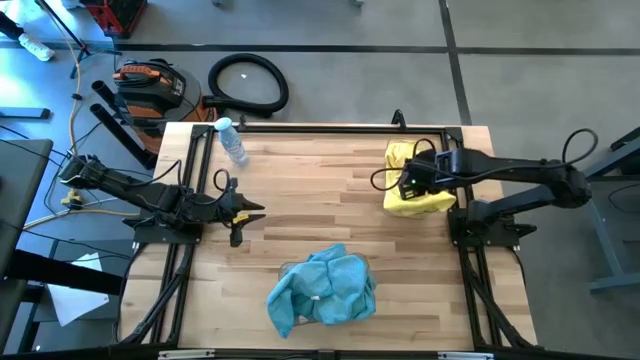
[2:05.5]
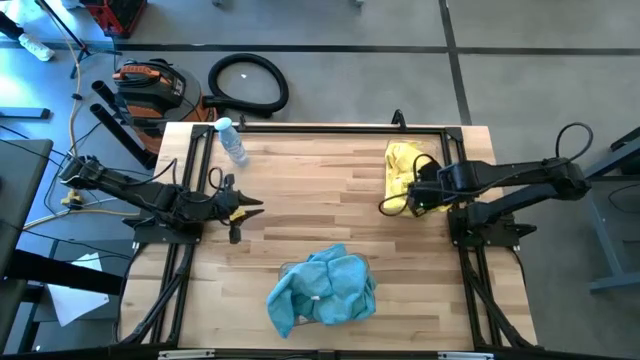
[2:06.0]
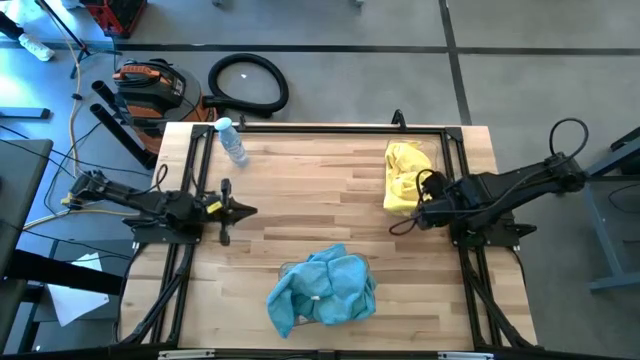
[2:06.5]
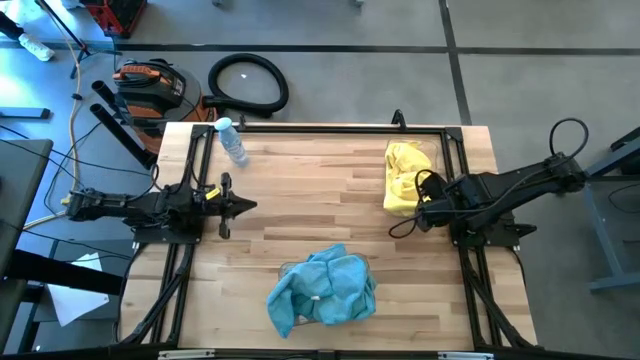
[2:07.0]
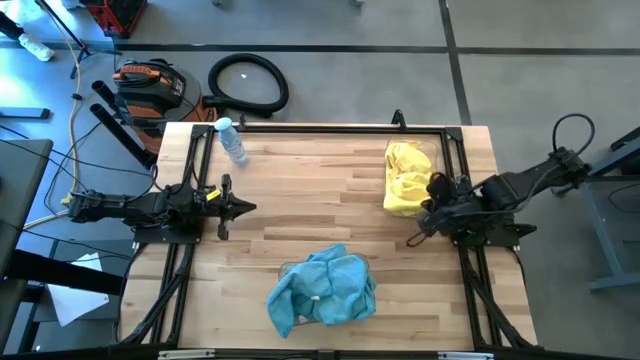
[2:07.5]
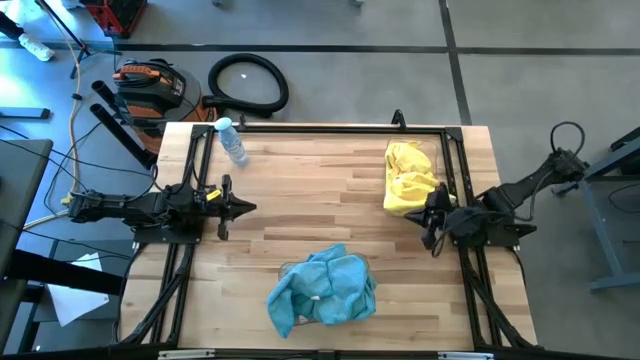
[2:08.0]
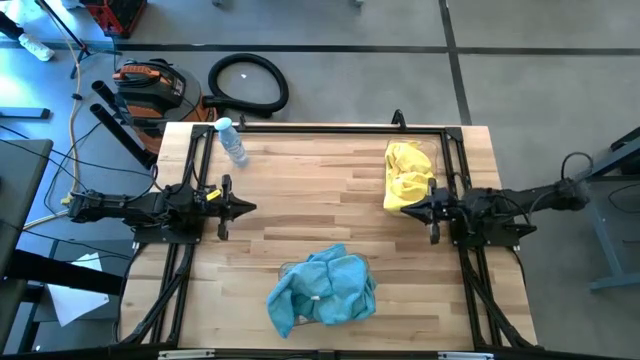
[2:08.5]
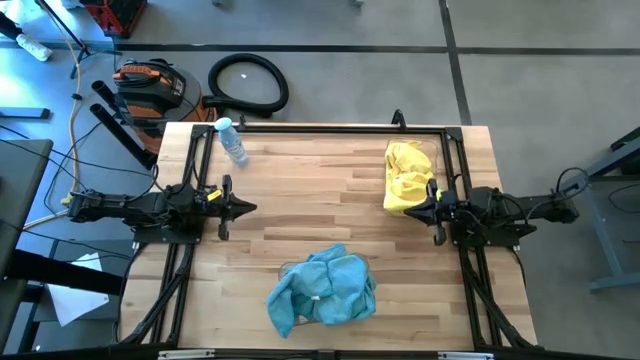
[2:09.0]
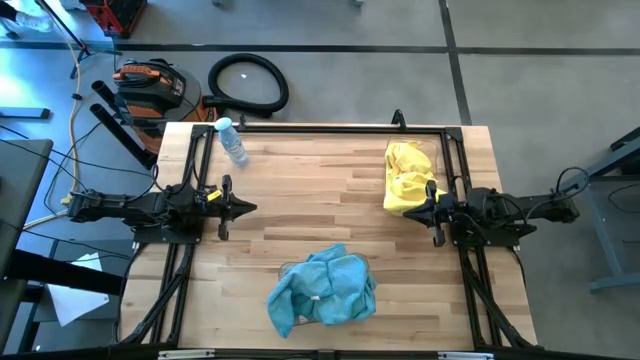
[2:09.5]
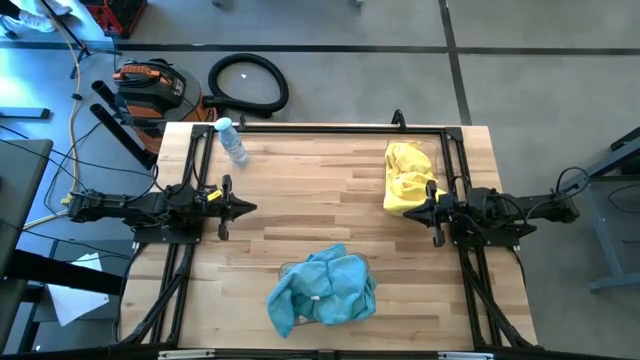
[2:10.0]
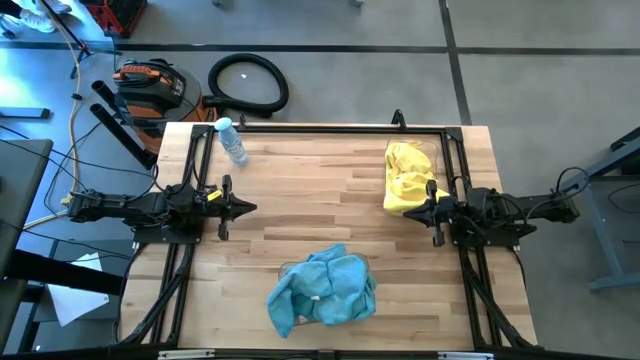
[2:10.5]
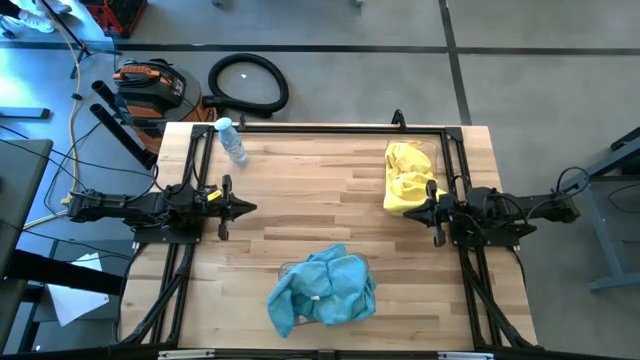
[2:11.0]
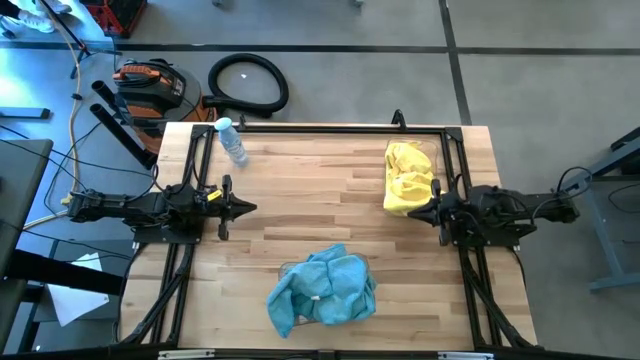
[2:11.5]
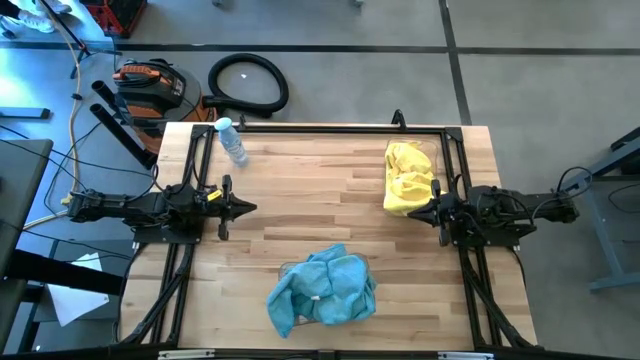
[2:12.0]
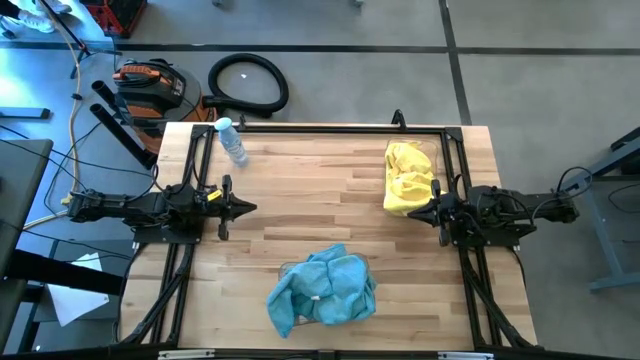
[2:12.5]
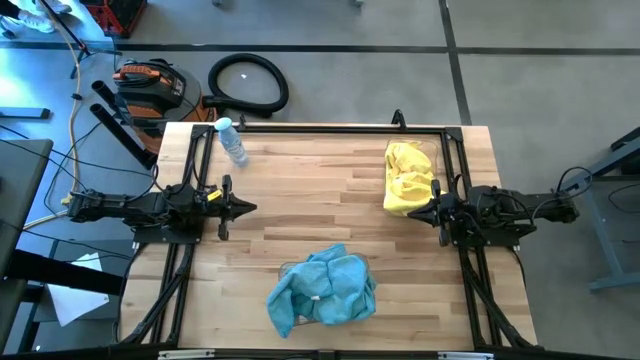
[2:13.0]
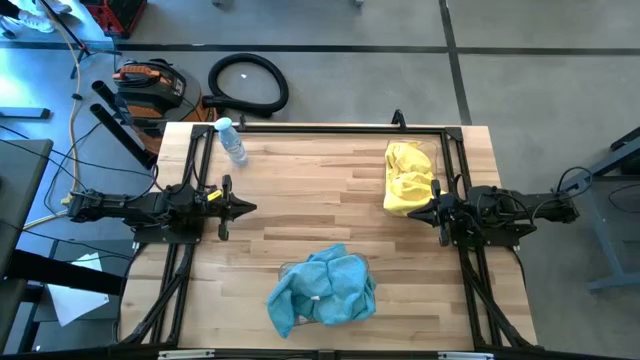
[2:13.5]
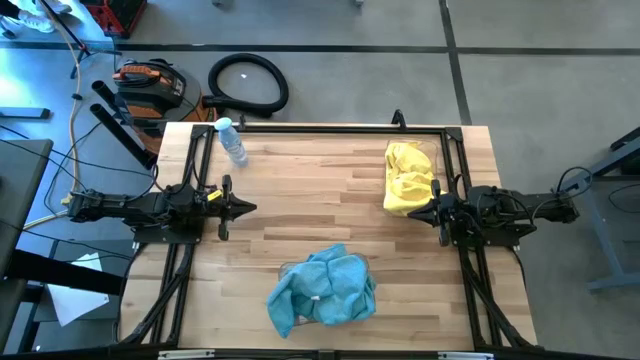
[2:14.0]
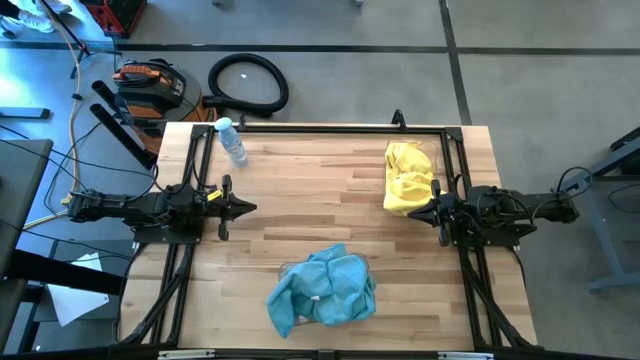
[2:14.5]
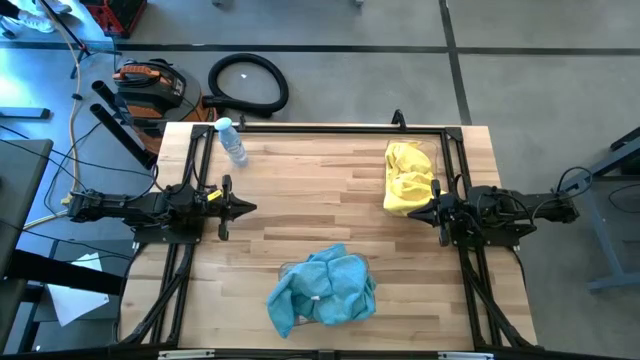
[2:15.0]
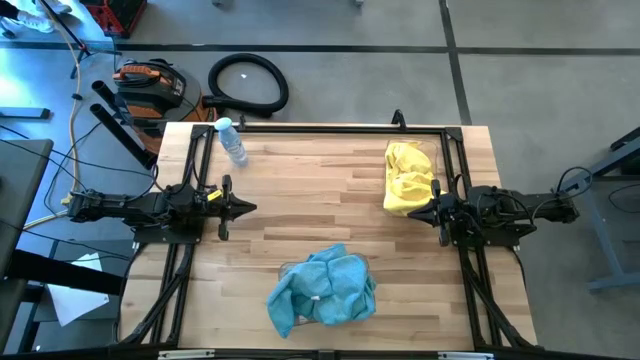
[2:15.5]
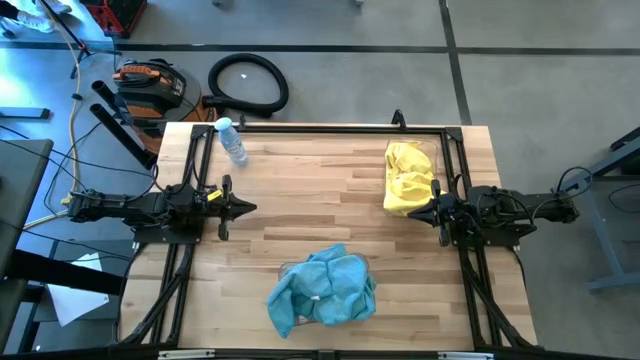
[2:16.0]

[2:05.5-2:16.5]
Task: Sort microfiber towel by color & place in baskets
Return to Home Position

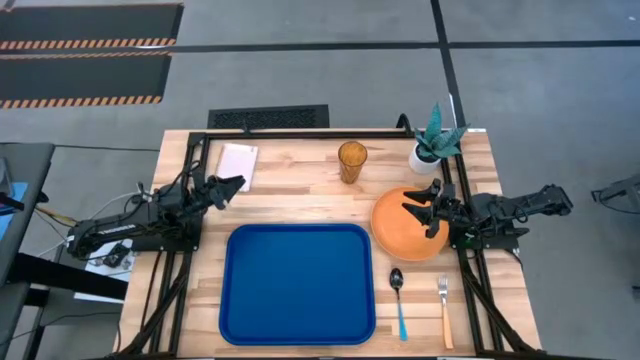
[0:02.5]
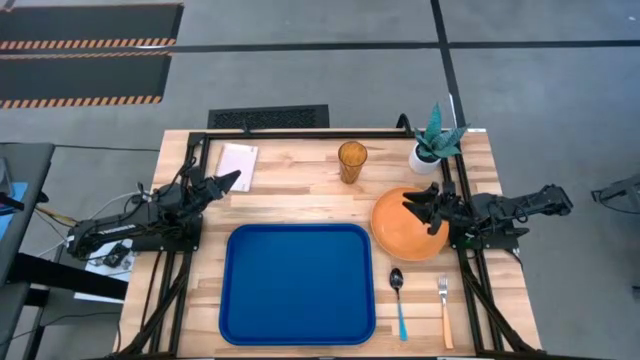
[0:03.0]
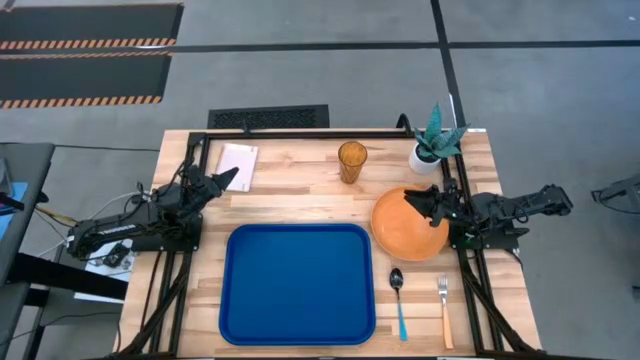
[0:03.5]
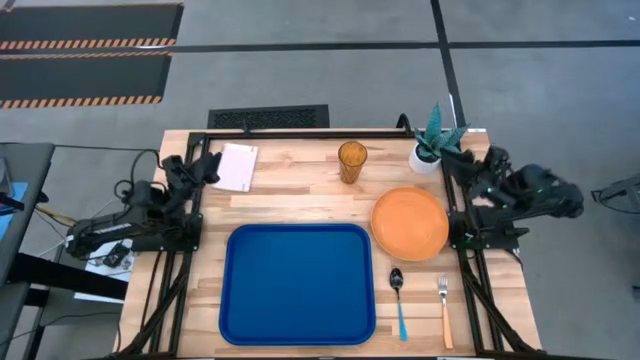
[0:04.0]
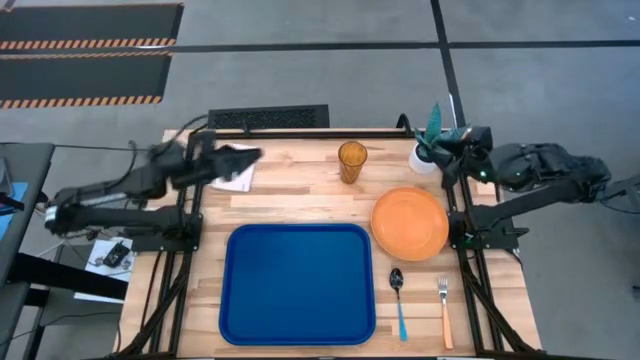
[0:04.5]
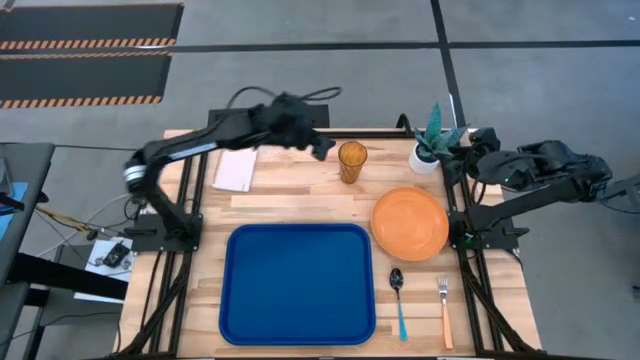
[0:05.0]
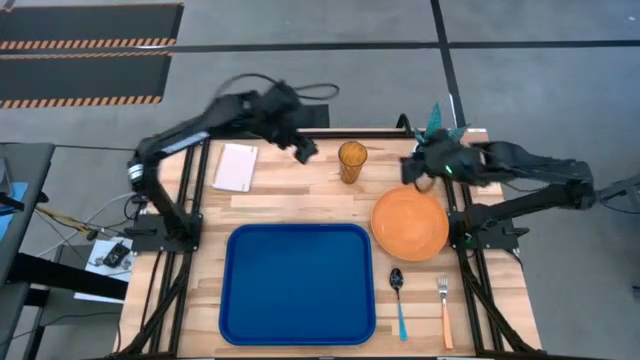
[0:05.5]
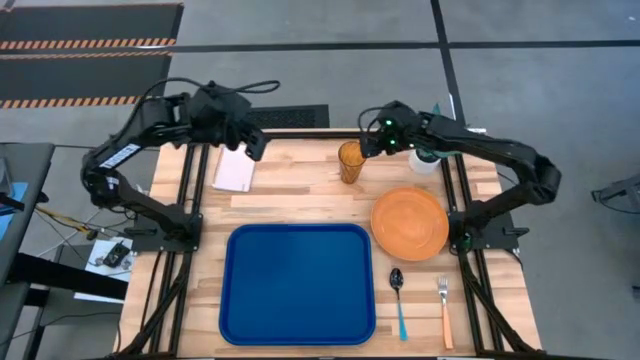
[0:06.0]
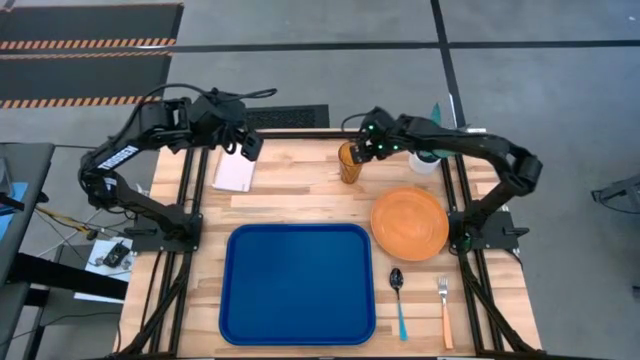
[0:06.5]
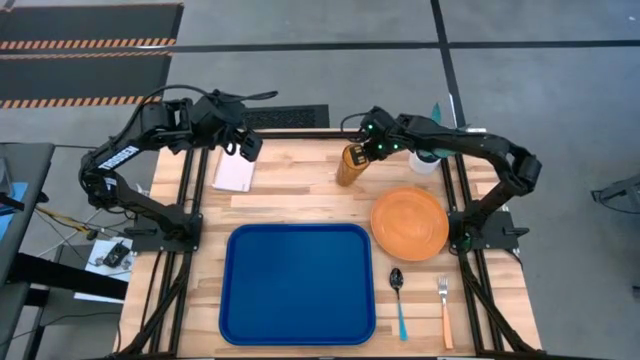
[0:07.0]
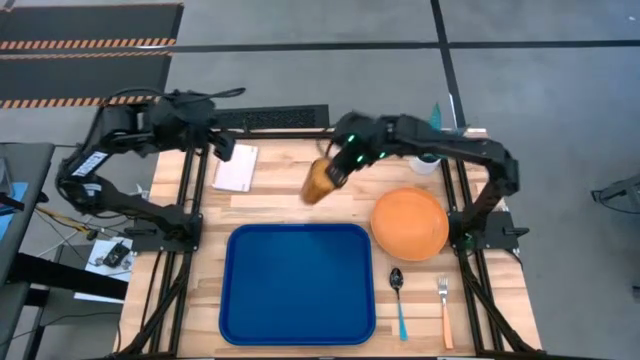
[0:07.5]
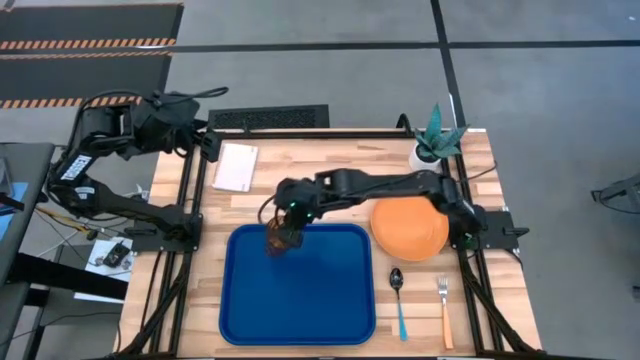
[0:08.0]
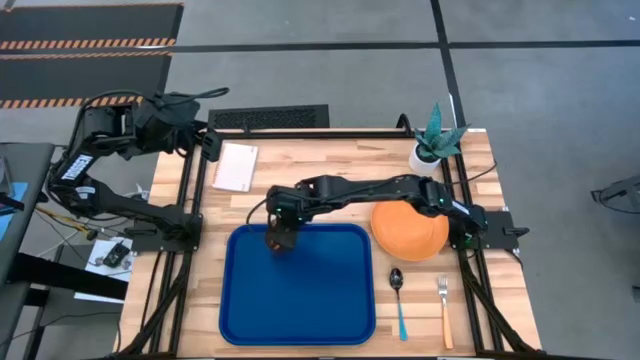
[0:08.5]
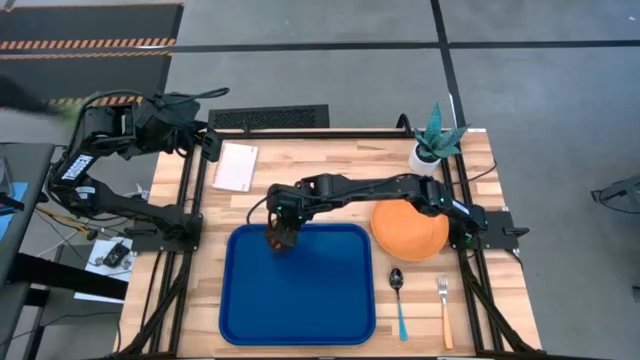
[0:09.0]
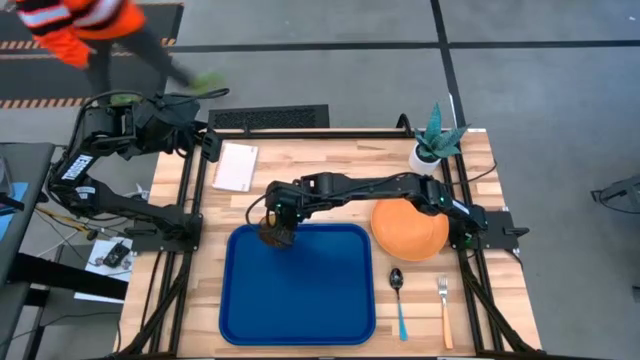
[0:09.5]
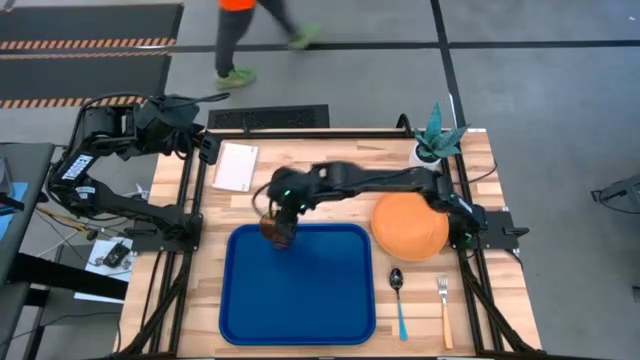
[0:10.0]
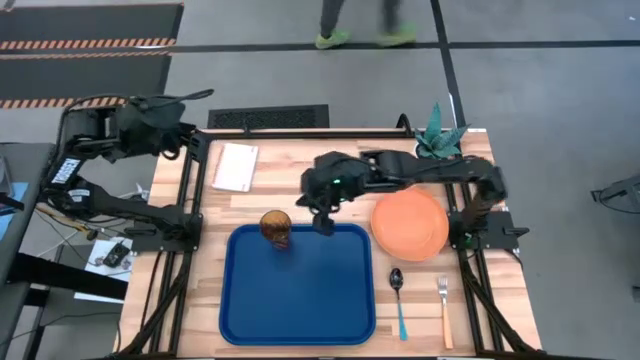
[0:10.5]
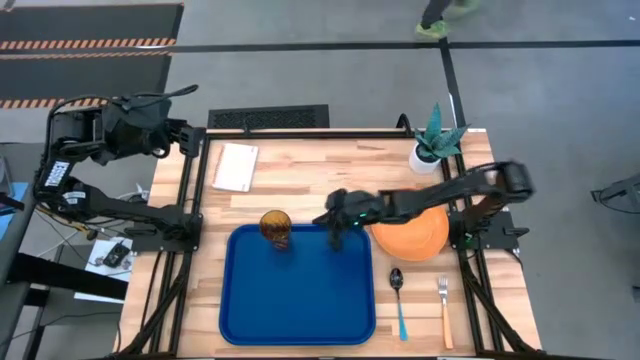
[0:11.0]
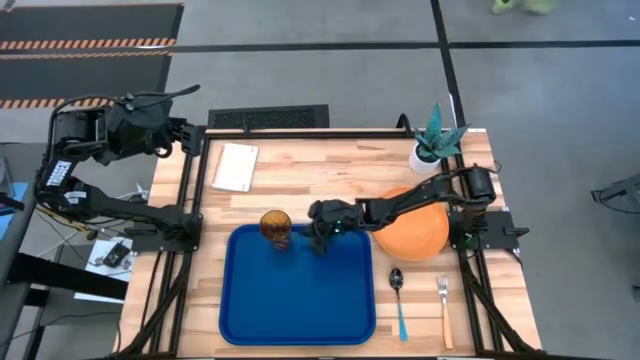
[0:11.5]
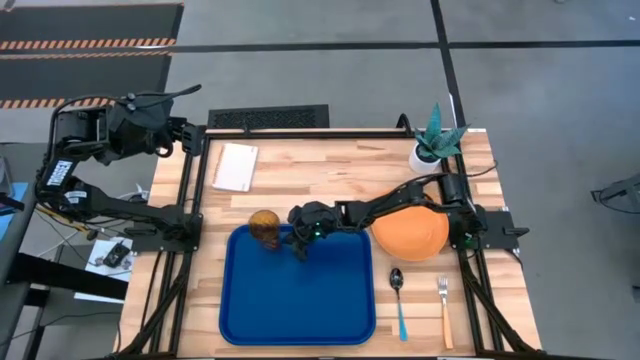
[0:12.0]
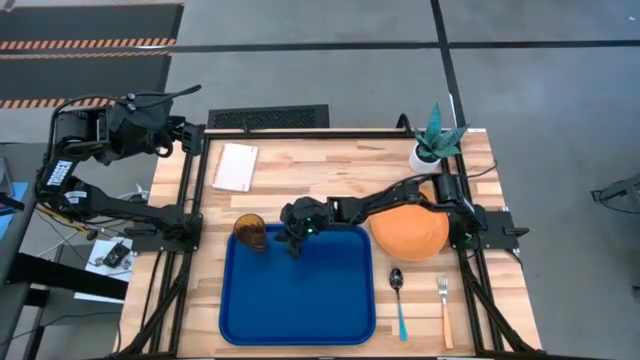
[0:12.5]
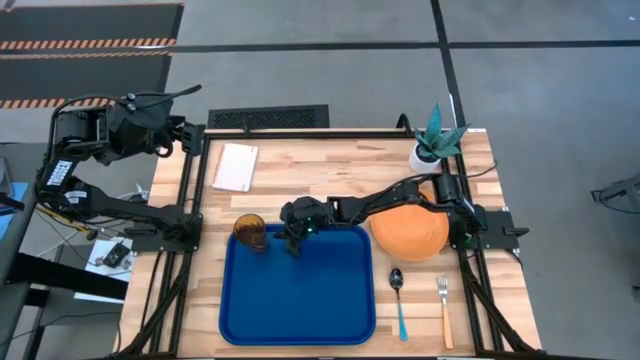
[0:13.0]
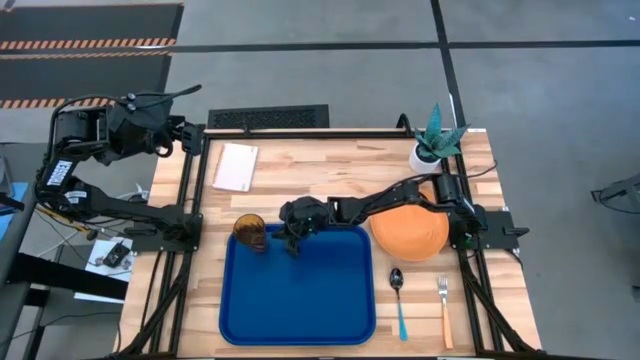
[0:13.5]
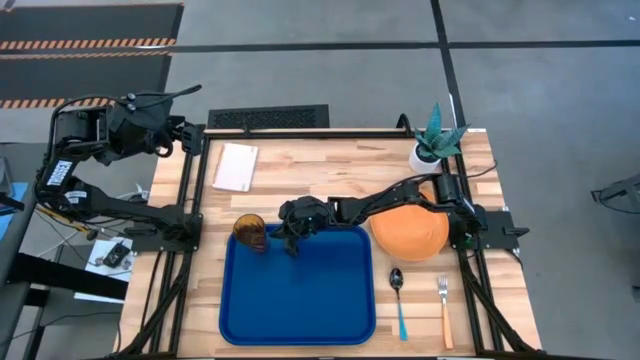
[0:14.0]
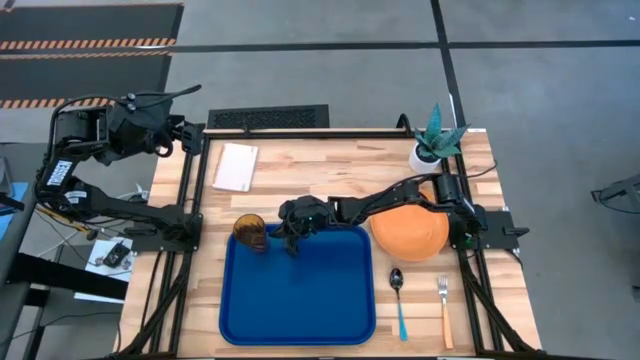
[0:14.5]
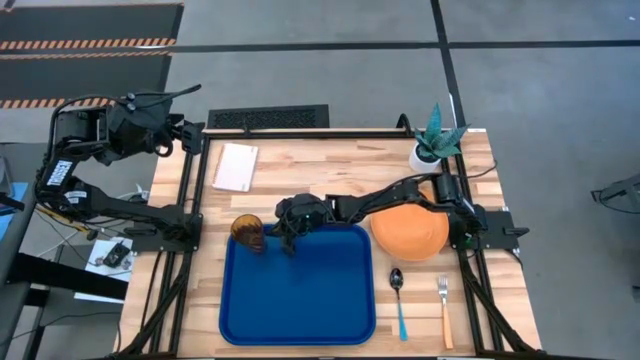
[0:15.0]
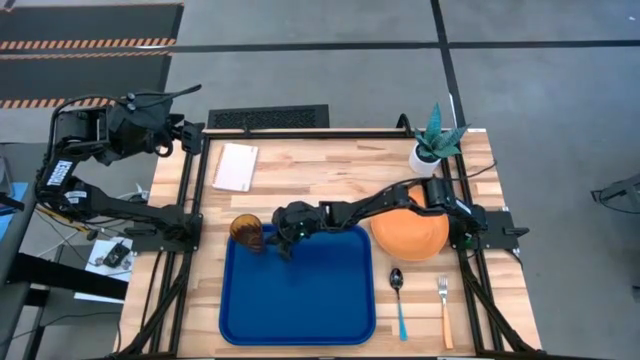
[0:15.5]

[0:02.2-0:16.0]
Task: Pick and place plate/cup/fork/spoon on tray
Put the orange glass cup on the top right of the blue tray
